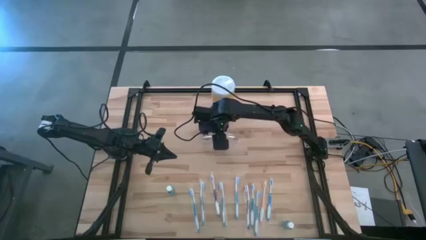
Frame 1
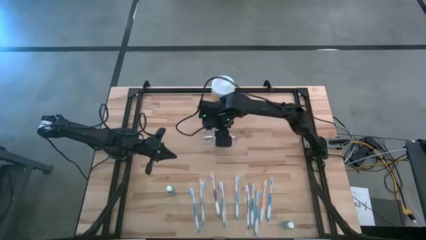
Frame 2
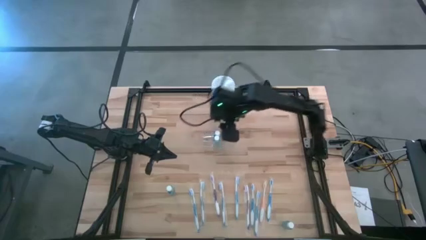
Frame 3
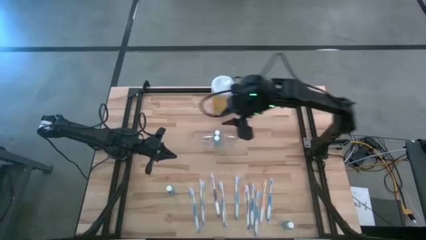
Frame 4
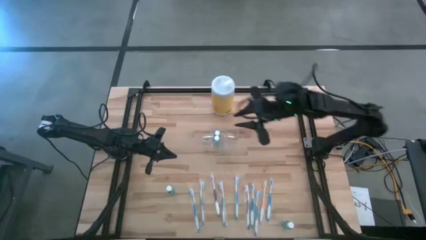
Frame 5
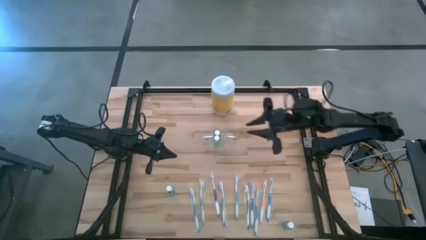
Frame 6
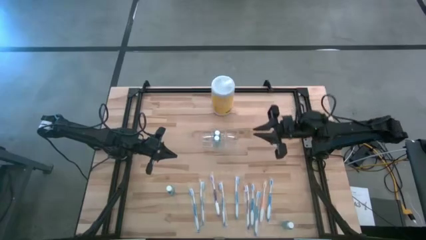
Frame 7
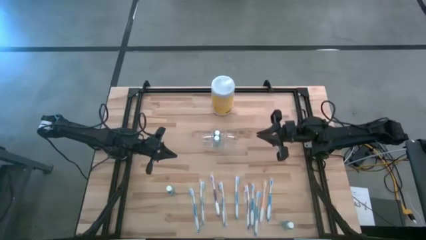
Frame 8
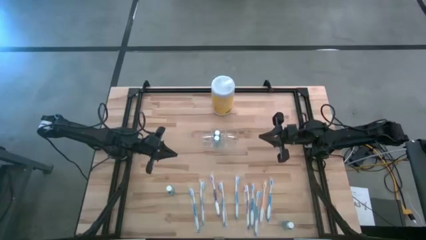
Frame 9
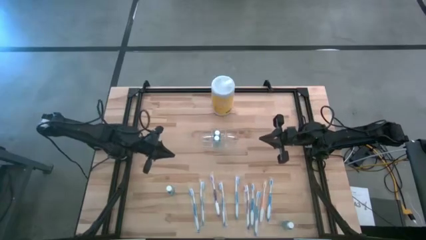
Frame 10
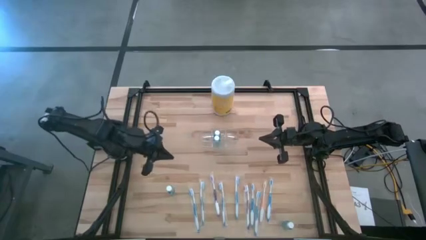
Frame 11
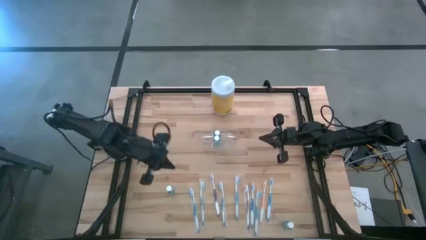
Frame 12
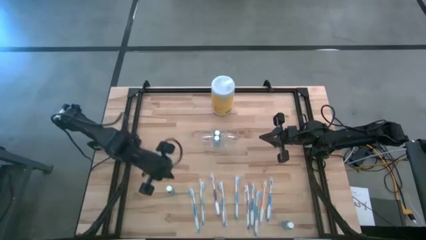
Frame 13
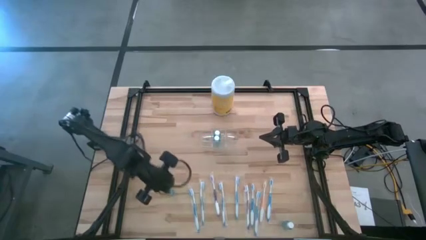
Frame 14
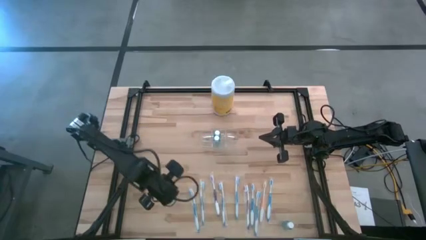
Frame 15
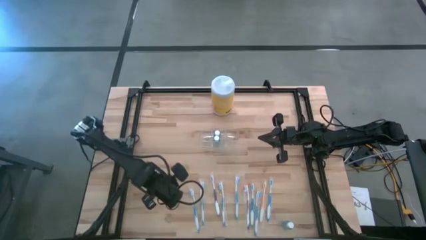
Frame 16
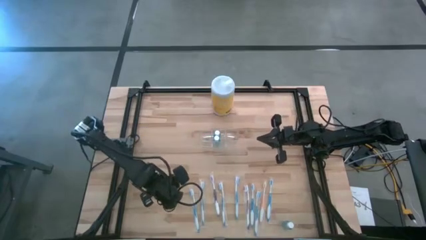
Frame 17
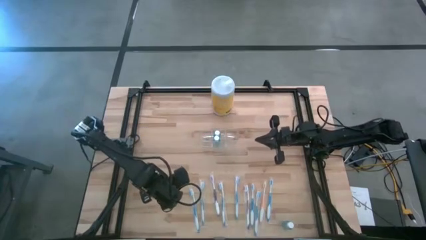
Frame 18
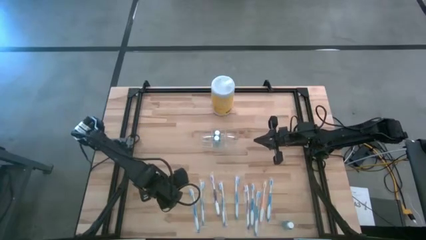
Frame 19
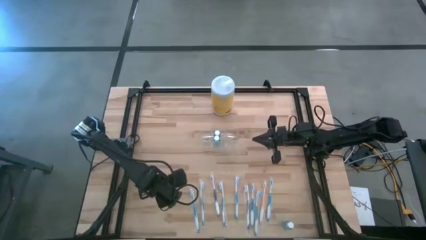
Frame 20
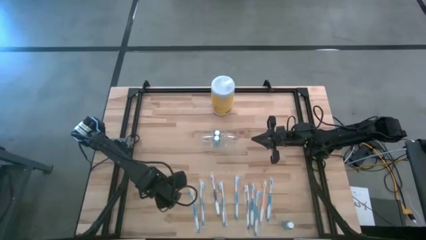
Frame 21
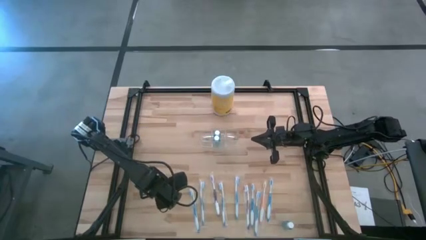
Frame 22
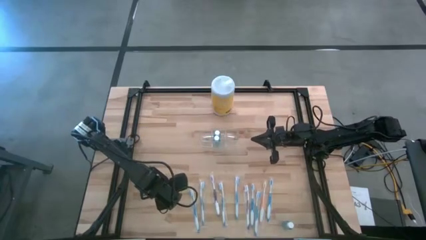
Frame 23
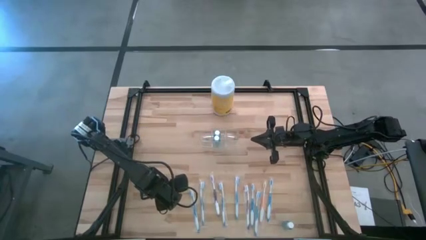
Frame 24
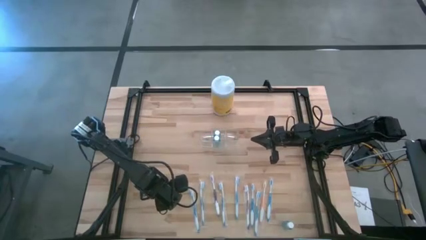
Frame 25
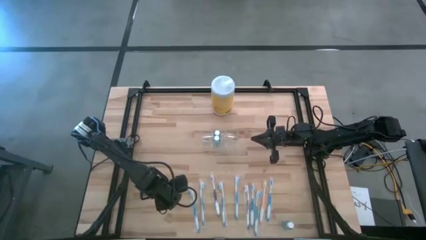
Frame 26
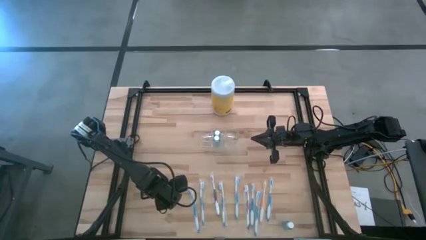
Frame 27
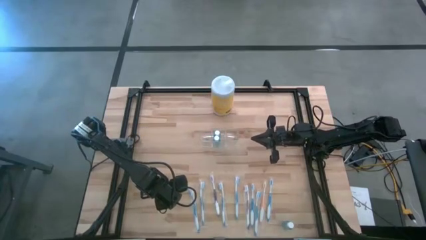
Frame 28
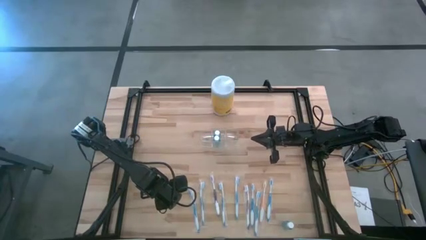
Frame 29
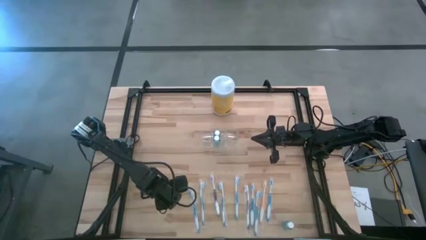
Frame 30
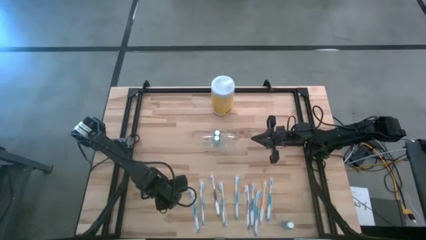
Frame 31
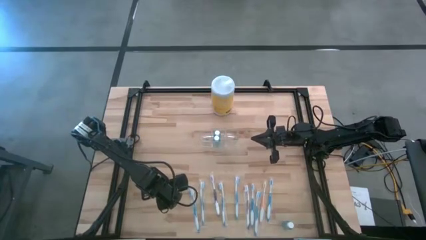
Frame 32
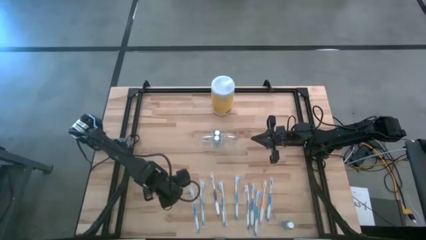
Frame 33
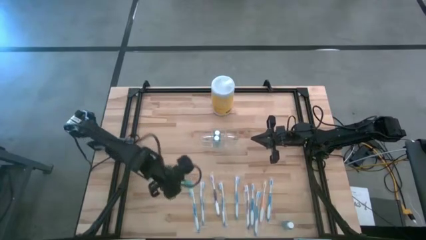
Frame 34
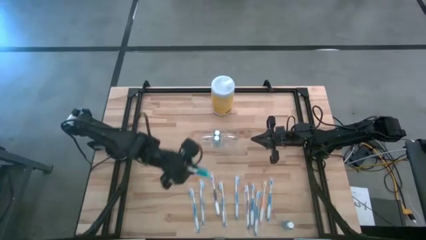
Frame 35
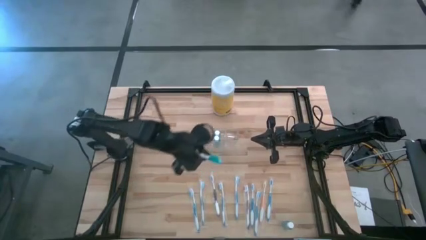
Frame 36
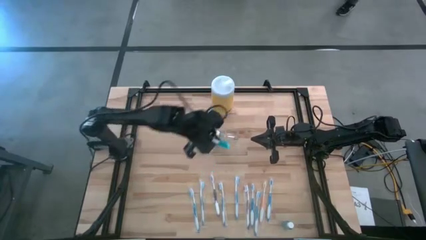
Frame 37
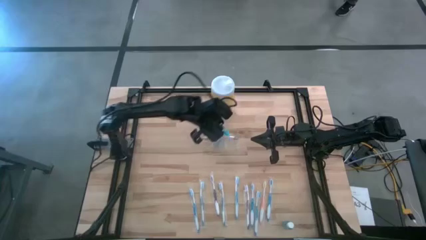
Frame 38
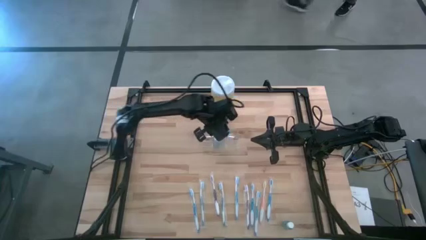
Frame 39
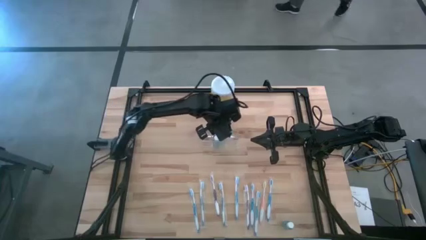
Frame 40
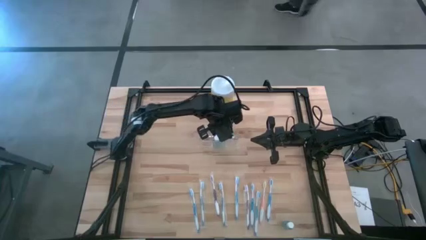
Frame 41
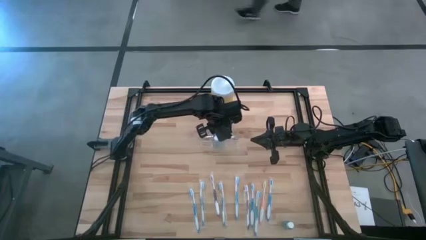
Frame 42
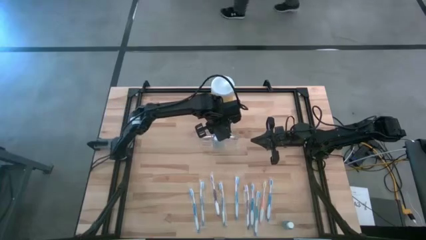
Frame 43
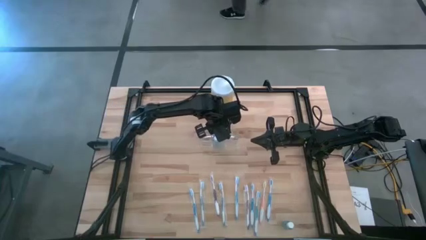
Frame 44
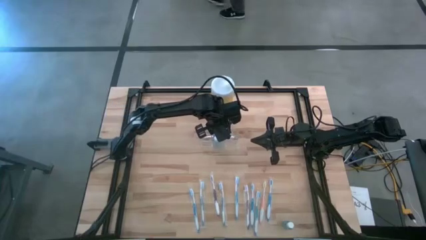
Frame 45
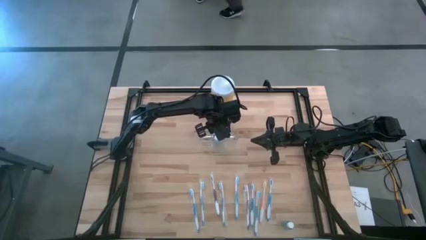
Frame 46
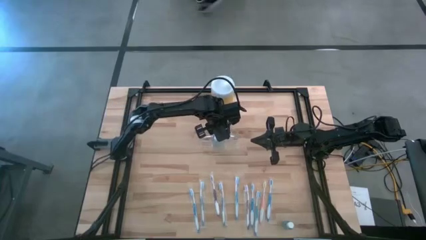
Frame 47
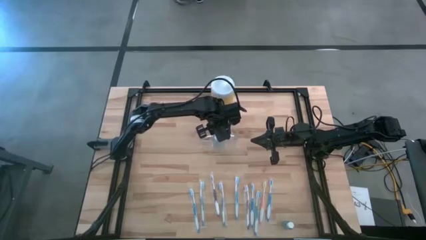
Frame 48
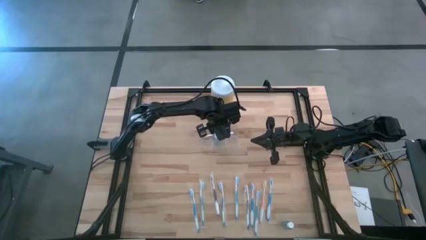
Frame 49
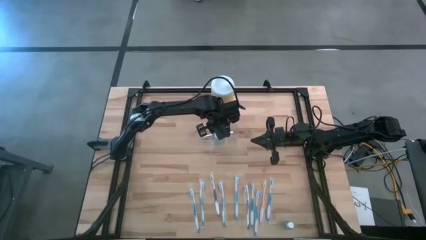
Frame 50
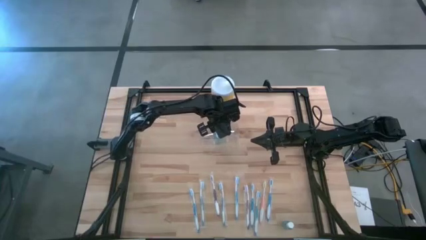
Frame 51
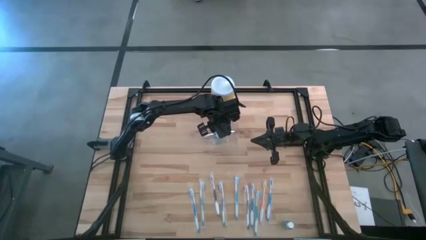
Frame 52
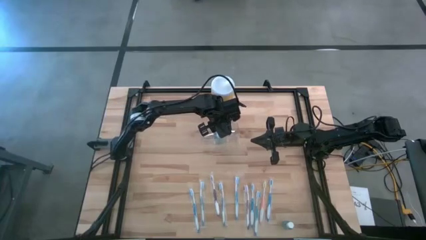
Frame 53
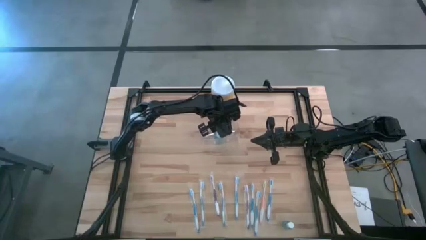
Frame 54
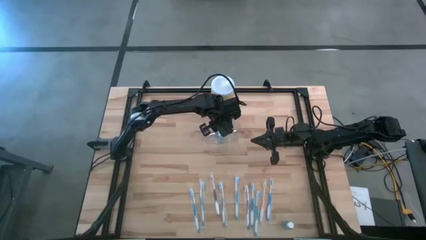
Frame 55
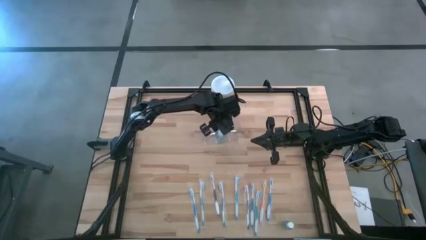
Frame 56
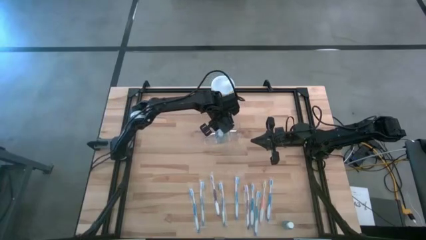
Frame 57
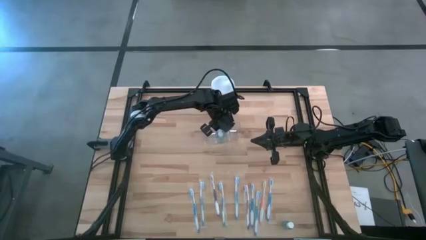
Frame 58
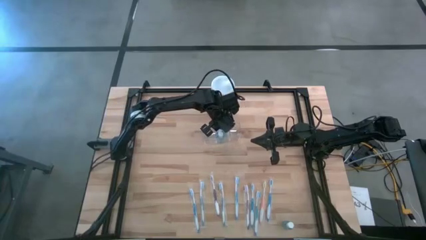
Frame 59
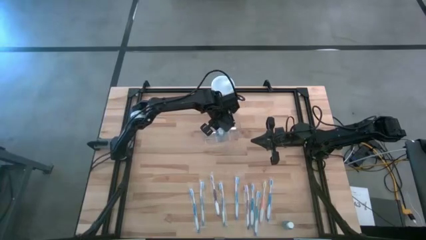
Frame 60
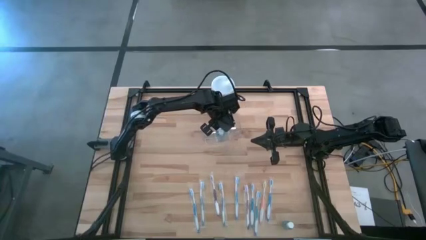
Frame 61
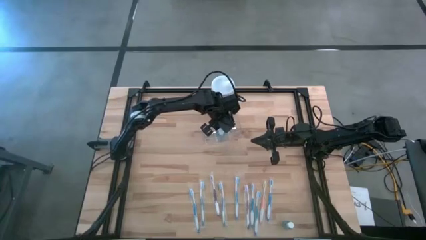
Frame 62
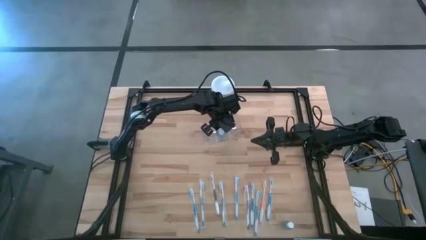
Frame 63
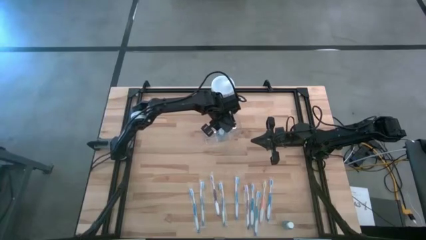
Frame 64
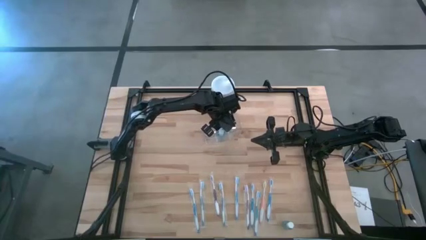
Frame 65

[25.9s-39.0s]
Task: Pick & Place toothbrushing station
Put the blue mouthwash into the transparent organizer

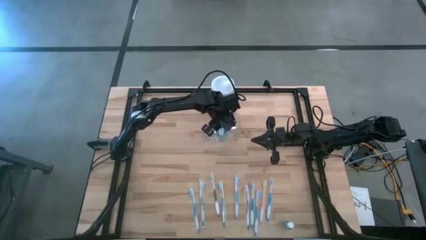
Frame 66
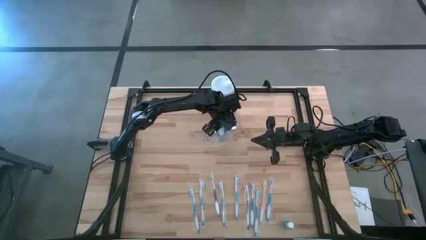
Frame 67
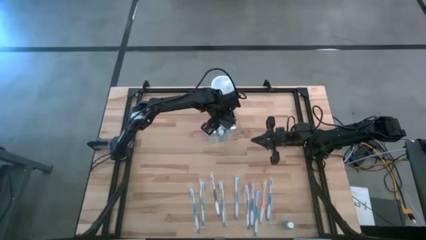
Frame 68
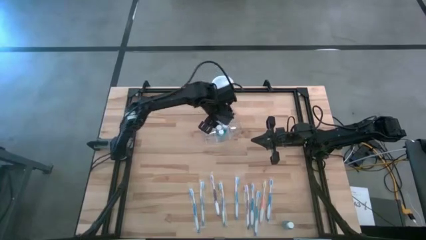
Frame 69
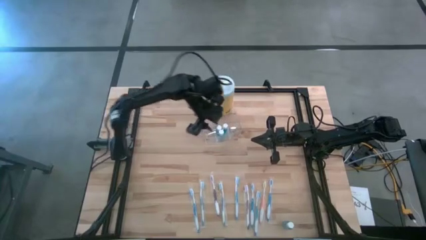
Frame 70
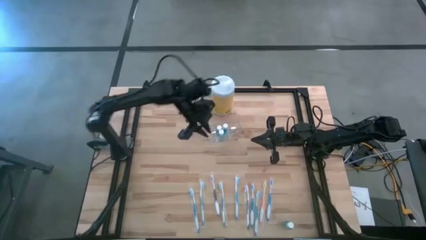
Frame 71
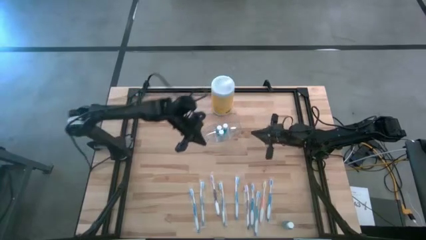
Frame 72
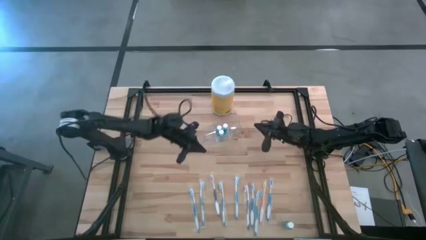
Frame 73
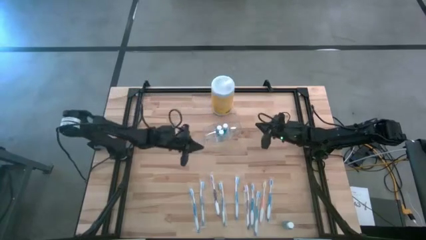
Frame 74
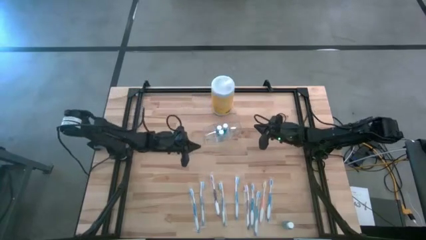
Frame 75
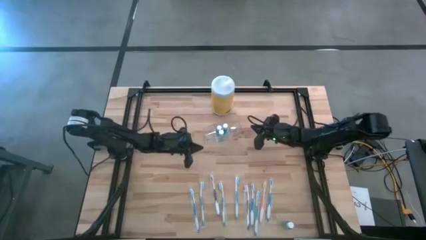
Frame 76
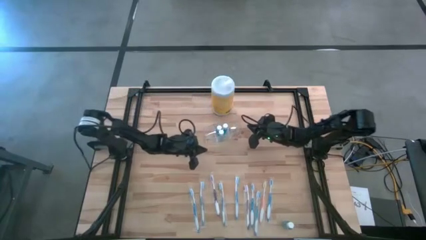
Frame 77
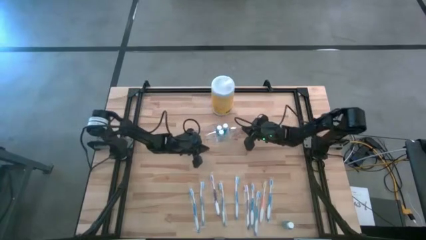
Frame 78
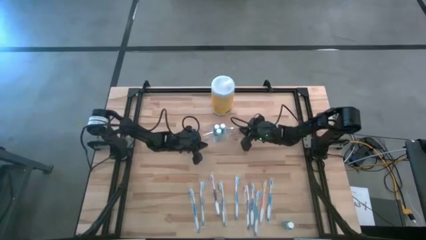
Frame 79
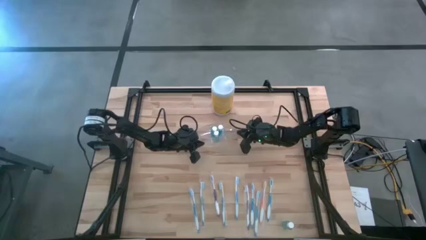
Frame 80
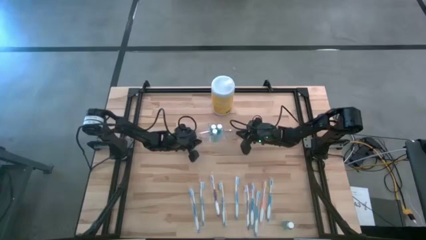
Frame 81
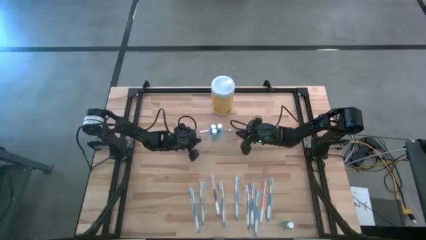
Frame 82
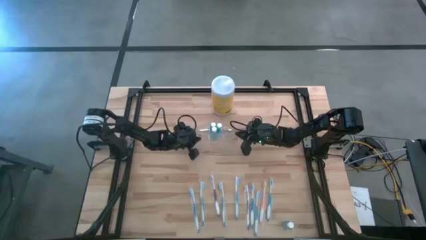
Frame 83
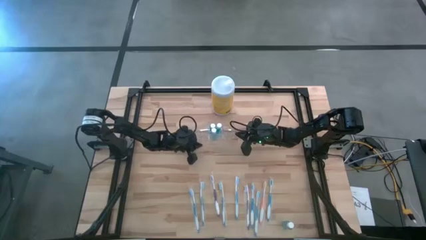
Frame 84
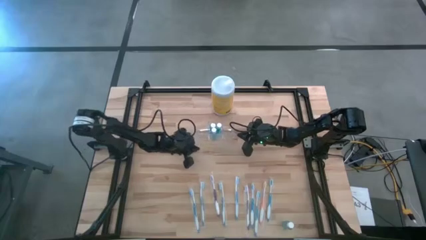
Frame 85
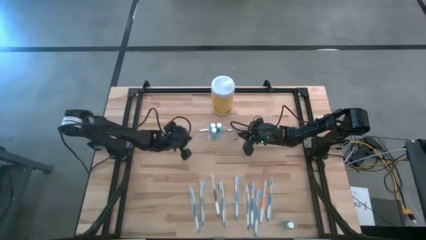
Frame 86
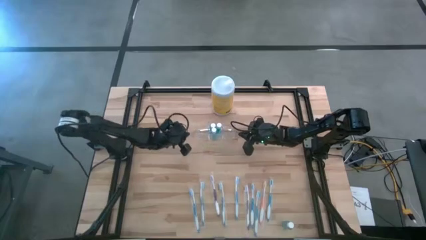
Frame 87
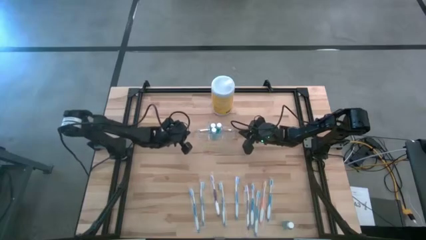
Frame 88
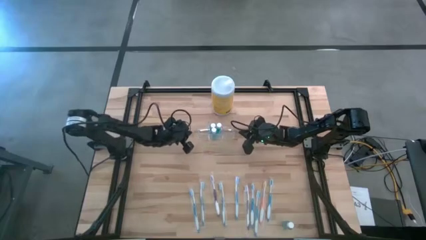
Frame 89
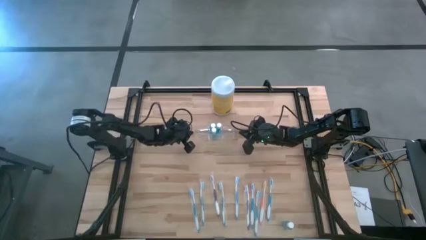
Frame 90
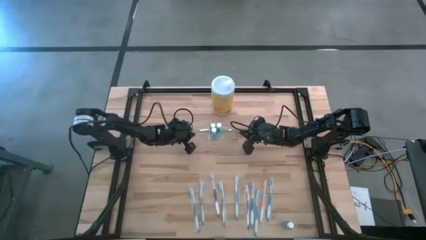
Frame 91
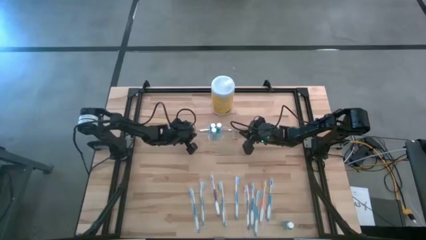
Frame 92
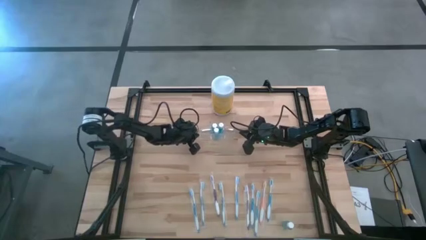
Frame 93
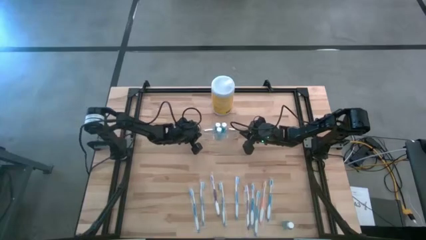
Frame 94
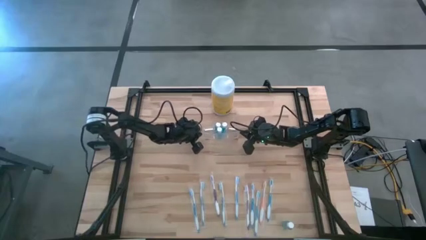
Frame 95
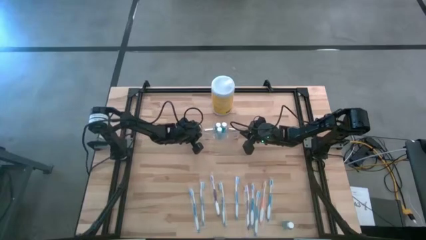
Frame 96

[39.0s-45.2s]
Adjust the transparent organizer
